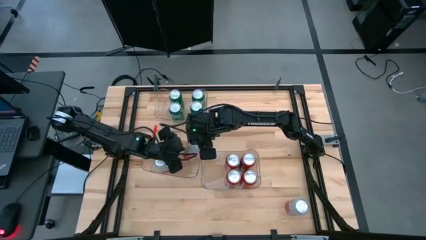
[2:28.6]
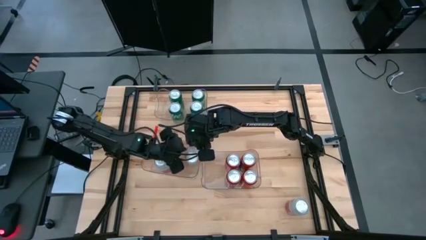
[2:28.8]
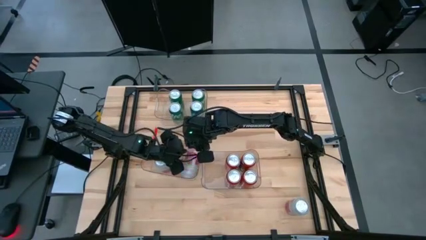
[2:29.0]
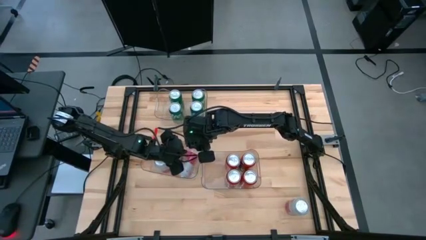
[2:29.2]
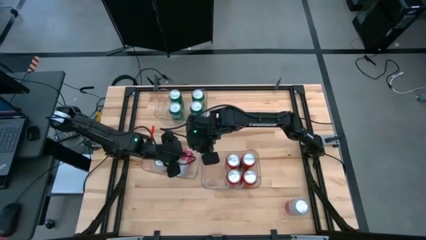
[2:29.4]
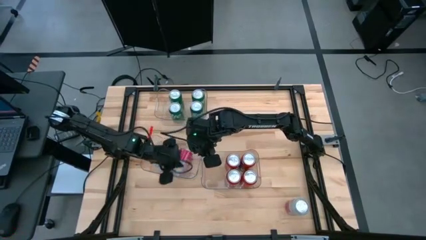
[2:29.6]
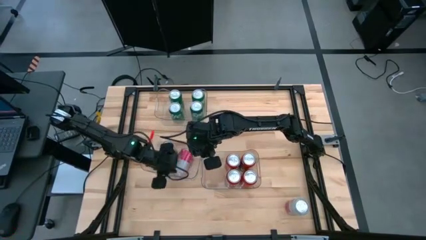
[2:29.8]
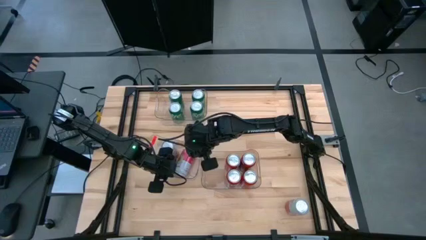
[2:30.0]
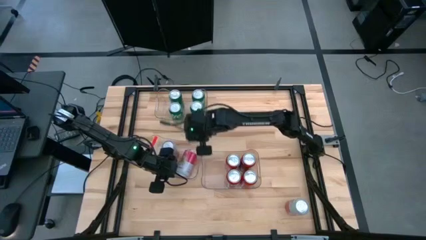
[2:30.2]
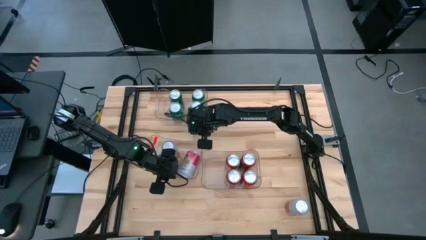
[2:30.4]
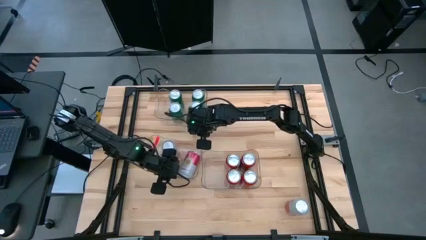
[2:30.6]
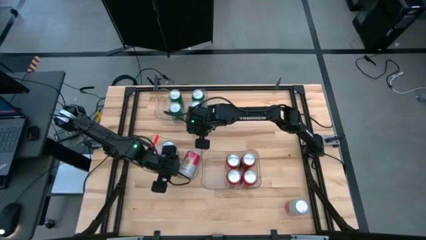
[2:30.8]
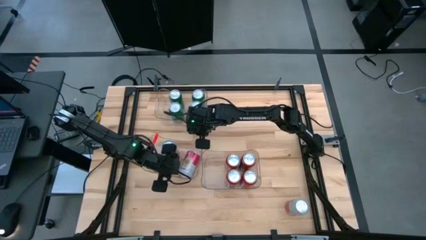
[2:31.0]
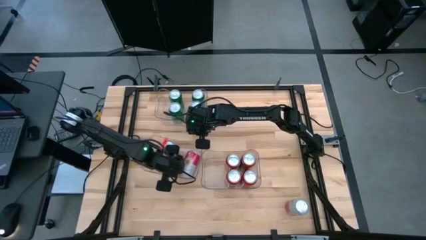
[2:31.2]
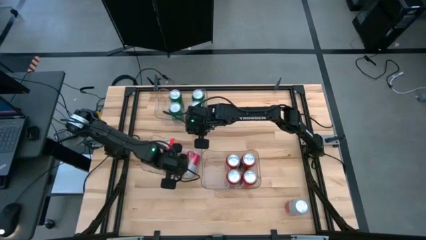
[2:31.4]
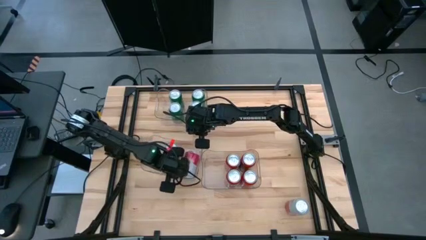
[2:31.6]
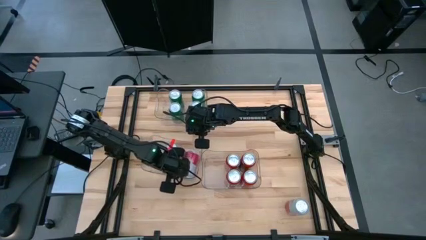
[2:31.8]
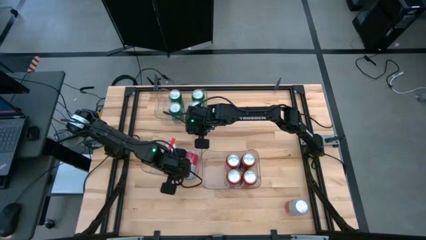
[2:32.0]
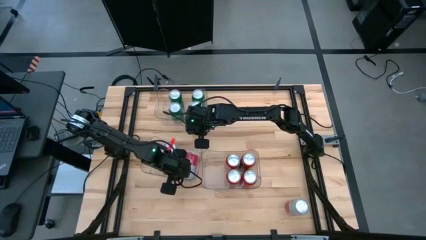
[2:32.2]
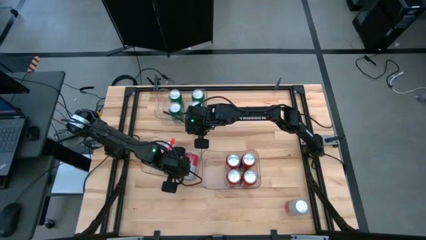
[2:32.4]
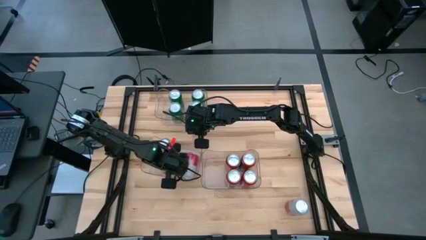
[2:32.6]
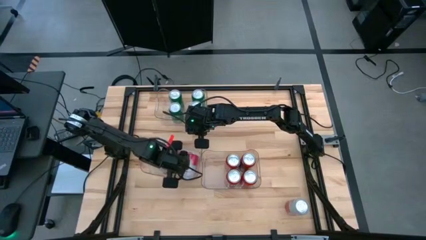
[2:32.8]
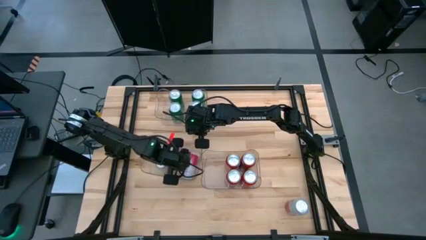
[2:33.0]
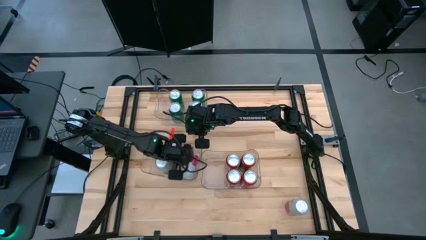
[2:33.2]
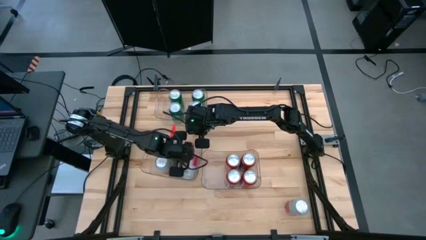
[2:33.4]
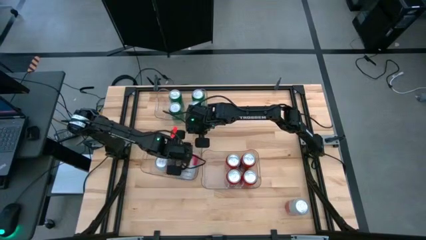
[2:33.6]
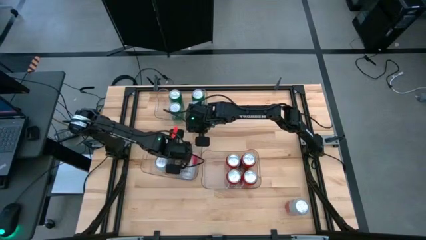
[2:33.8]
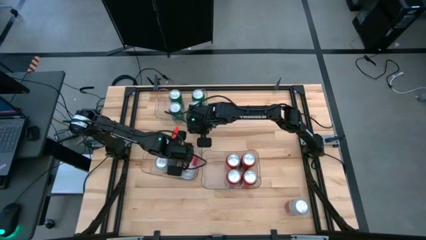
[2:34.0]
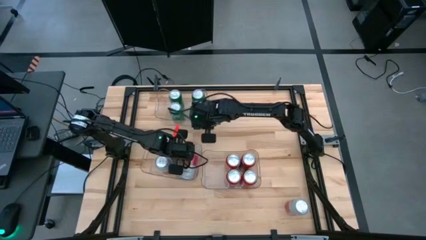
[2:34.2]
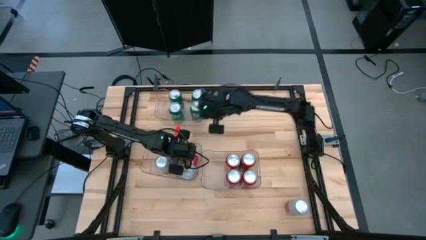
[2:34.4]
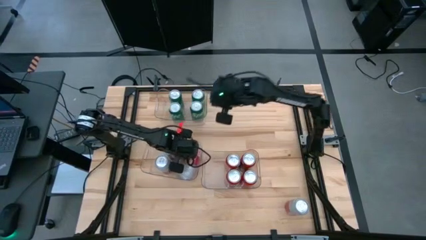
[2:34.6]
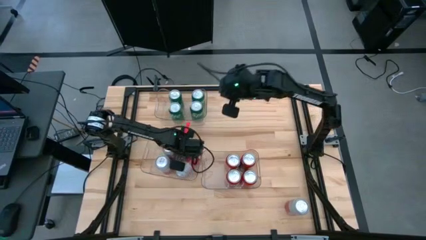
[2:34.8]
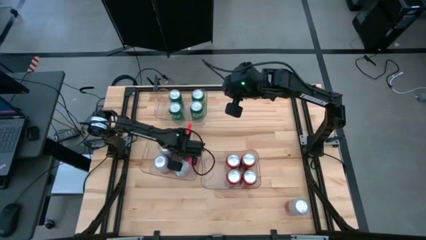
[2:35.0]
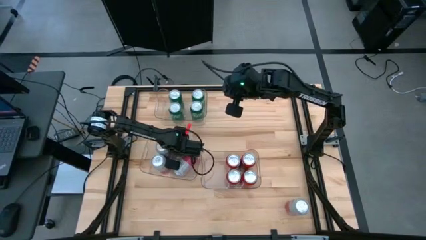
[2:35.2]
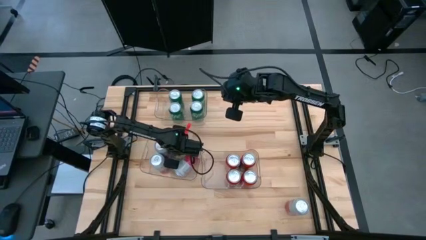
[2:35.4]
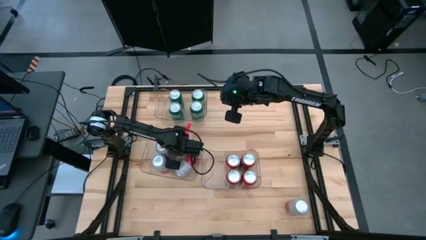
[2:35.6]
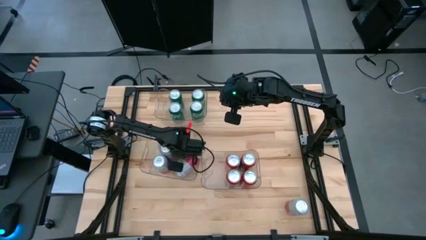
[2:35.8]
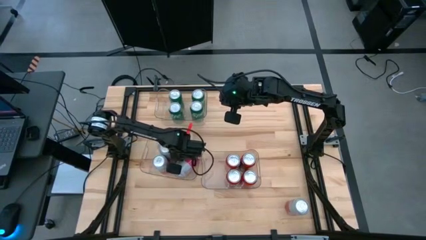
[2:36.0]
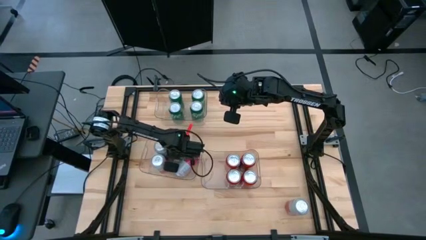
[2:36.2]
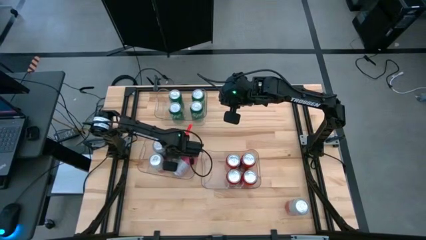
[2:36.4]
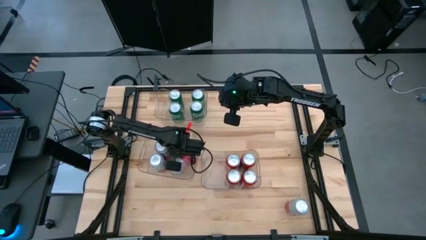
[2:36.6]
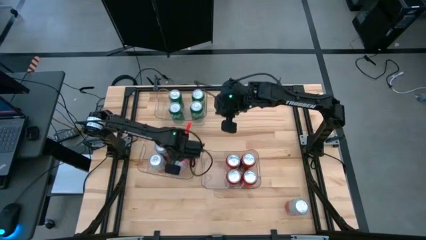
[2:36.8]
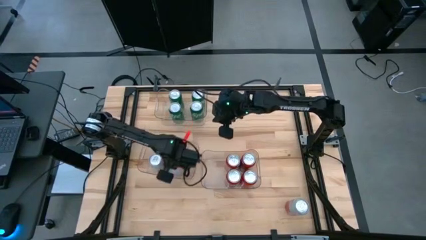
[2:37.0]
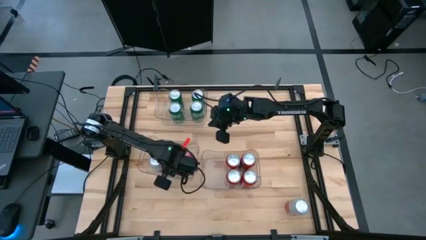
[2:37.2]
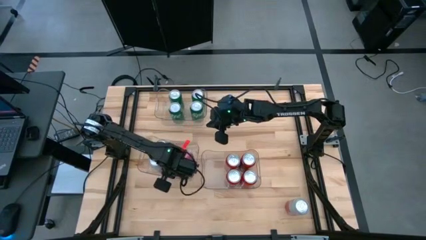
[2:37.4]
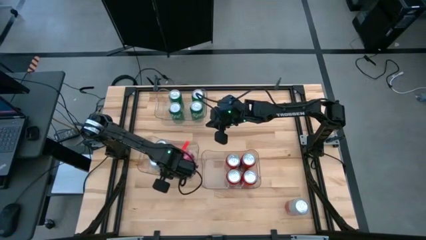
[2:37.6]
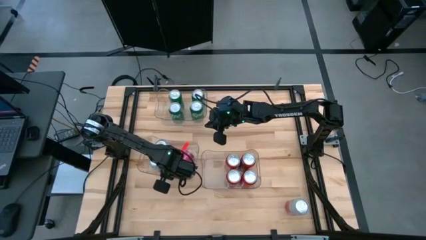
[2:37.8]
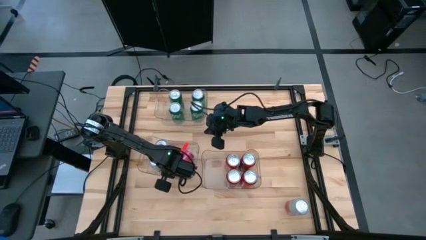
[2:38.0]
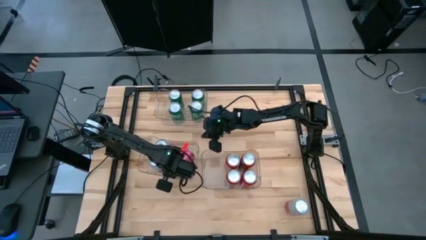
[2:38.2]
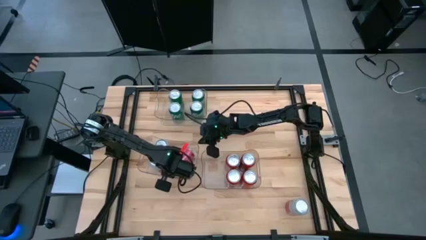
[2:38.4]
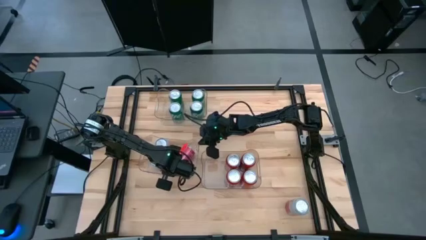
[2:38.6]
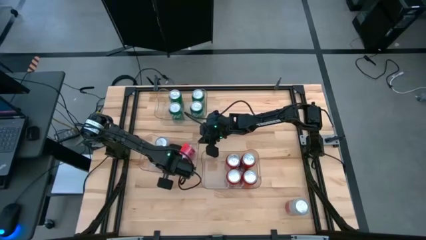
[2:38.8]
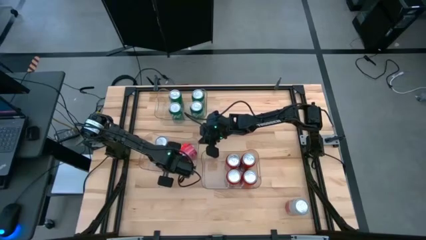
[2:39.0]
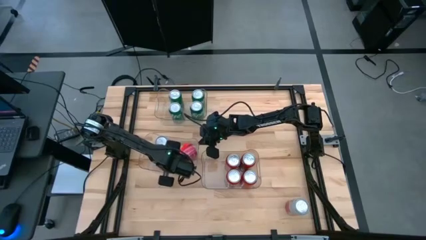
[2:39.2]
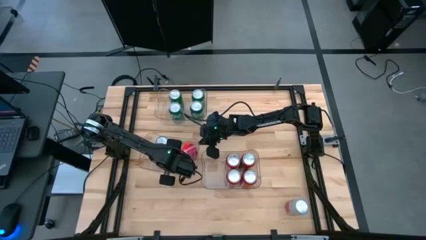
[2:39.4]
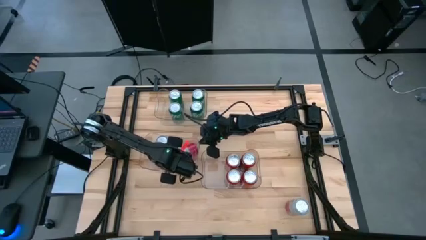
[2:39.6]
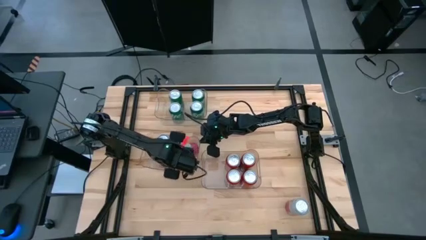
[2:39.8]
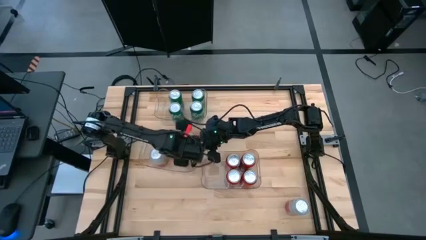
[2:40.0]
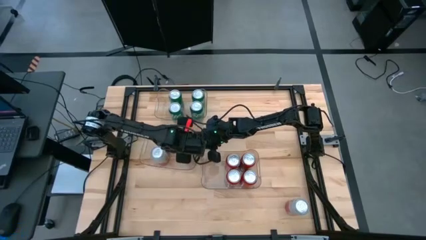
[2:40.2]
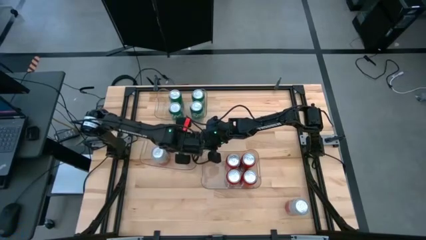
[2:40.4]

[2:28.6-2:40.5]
Task: Sort soda cans
Put the pink white soda can into the bottom left transparent bin

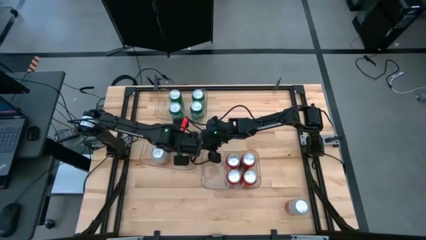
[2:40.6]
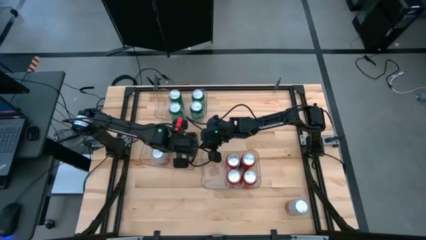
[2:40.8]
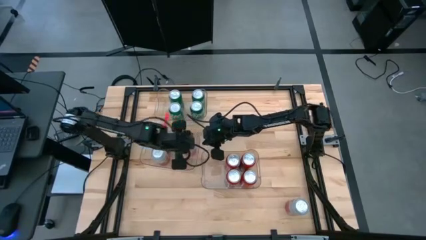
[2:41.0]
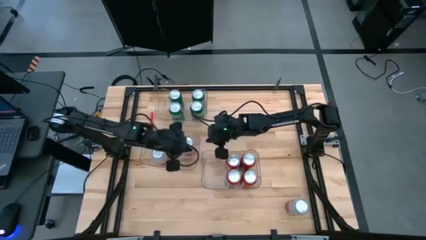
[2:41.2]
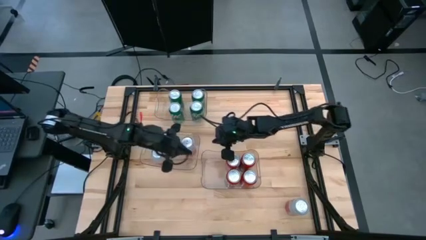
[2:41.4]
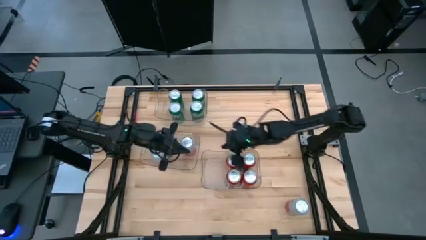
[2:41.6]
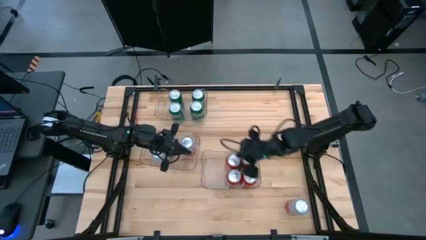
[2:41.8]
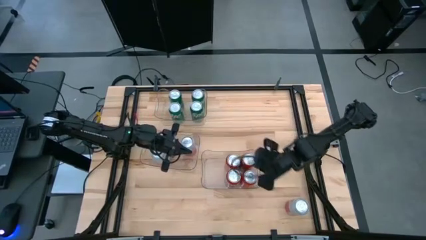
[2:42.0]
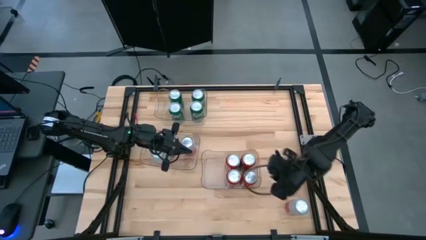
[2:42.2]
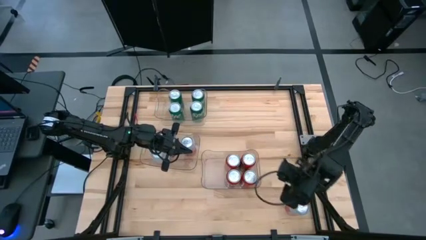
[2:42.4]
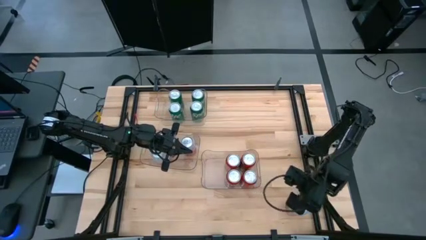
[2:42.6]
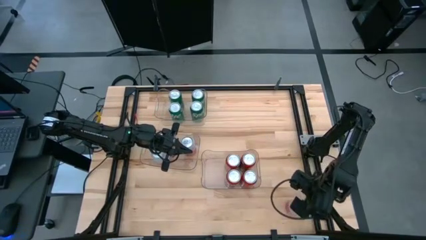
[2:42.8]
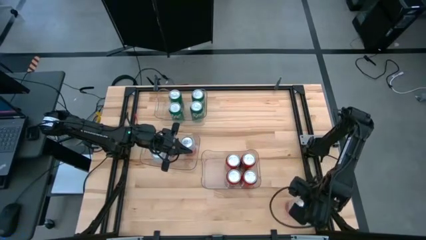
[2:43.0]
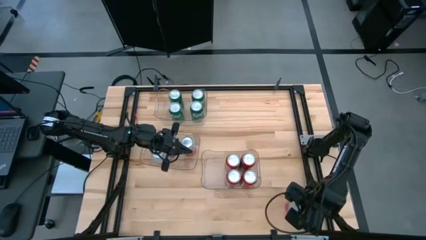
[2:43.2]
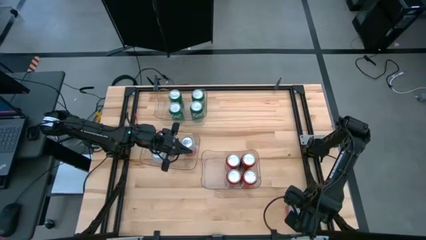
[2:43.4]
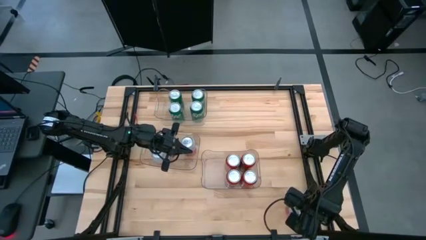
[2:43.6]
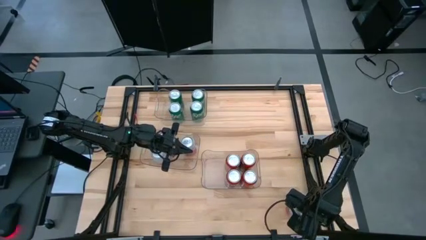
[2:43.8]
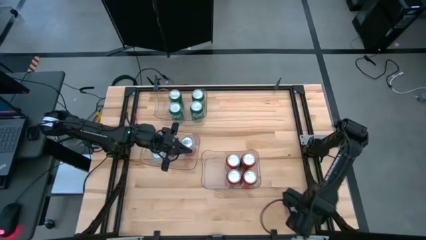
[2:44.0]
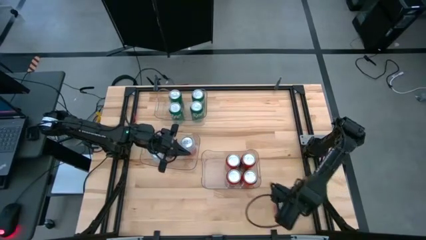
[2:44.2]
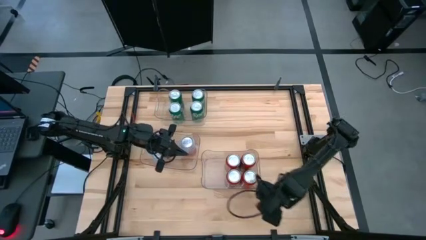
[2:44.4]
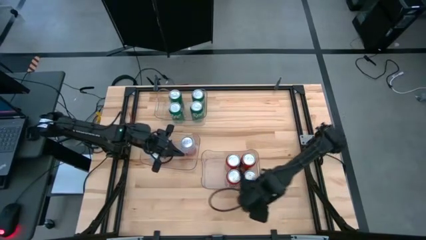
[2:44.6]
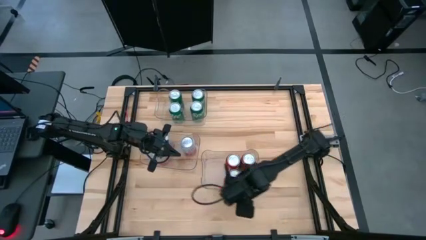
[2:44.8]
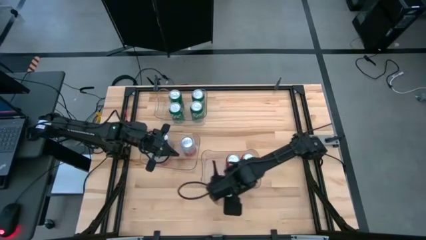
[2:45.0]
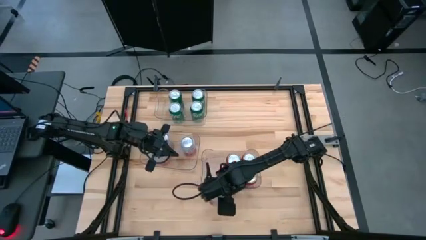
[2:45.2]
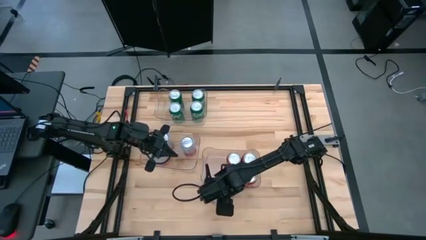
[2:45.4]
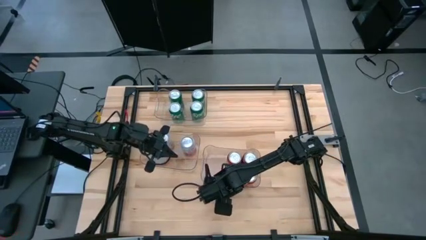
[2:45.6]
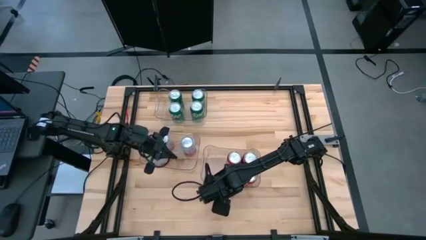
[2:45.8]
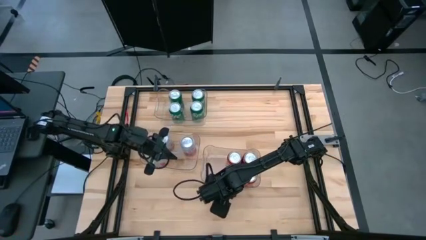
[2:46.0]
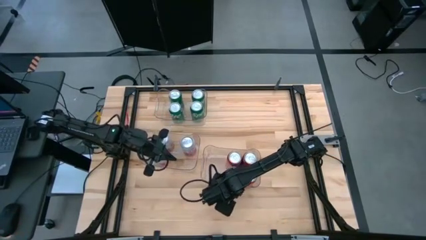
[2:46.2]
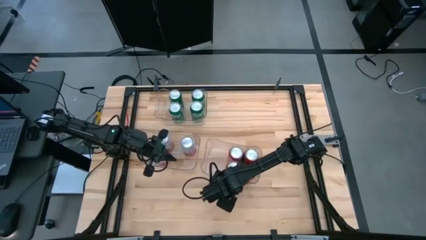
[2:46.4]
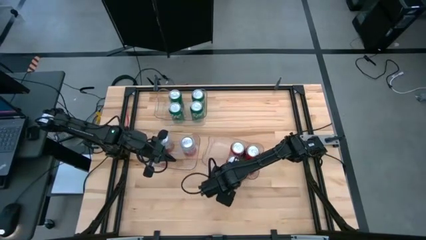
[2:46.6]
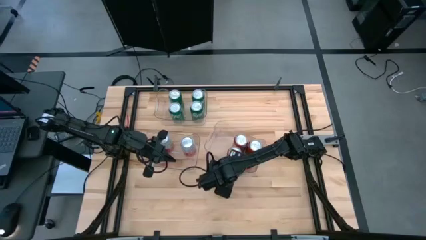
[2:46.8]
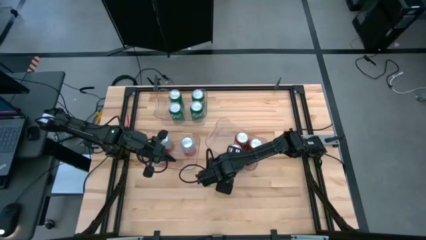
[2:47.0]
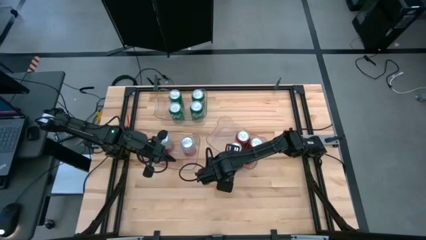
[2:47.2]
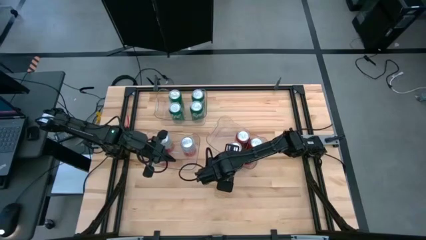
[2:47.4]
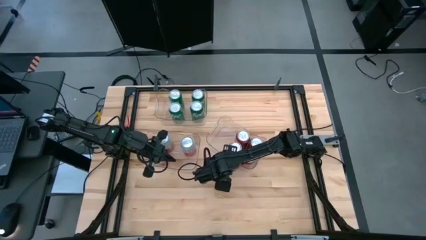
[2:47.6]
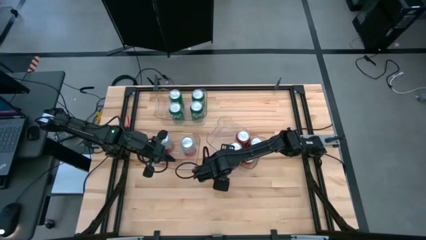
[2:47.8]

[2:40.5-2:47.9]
Move the pink white soda can on the center table
